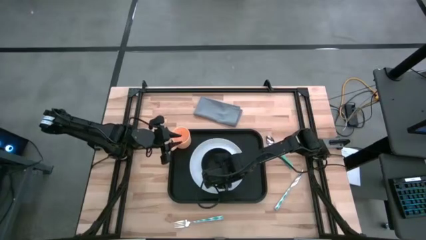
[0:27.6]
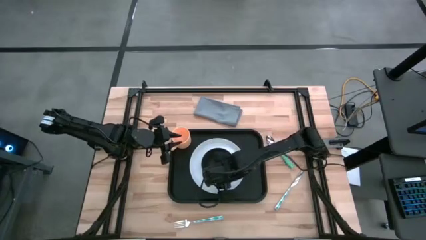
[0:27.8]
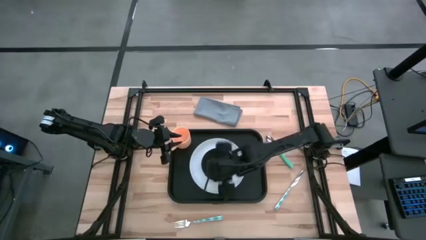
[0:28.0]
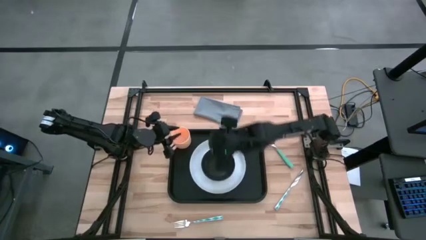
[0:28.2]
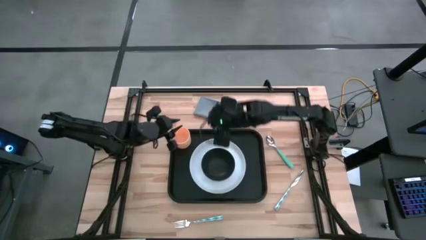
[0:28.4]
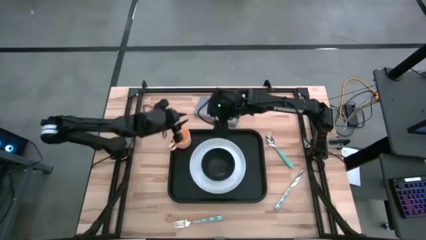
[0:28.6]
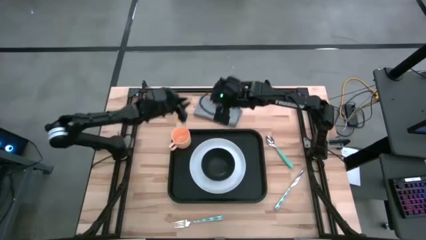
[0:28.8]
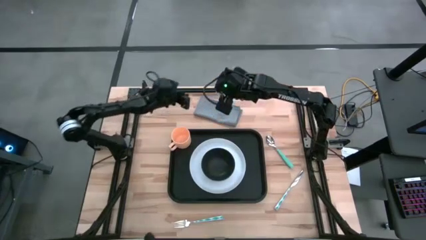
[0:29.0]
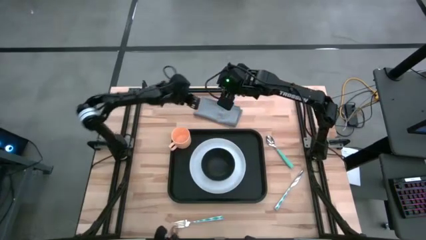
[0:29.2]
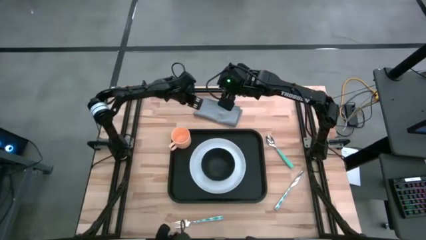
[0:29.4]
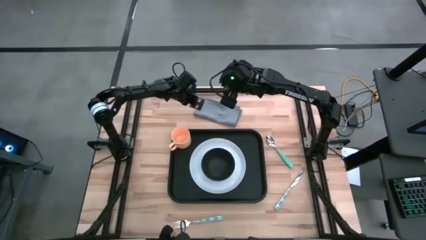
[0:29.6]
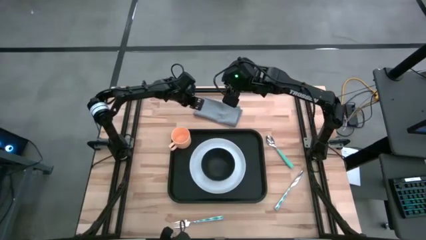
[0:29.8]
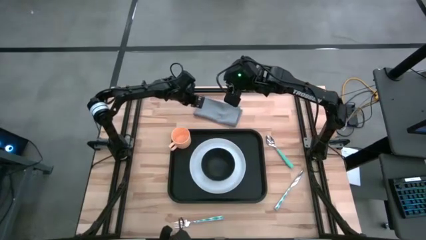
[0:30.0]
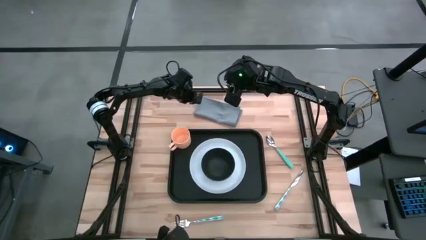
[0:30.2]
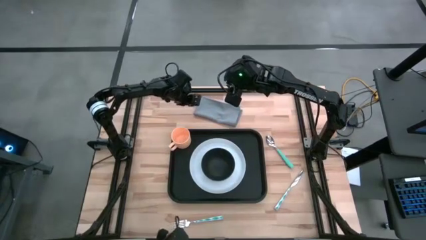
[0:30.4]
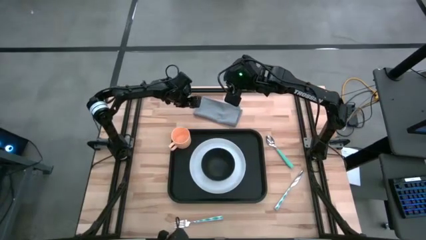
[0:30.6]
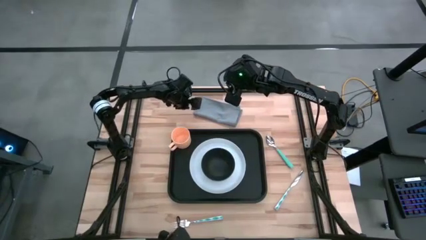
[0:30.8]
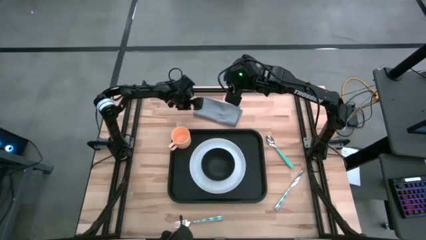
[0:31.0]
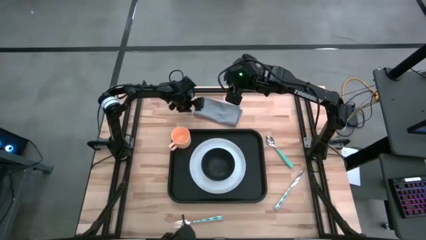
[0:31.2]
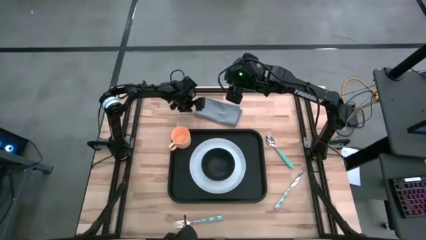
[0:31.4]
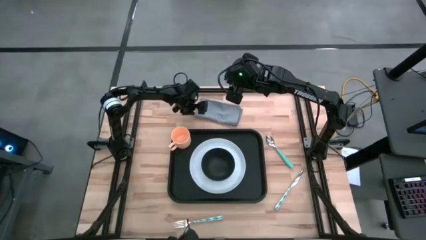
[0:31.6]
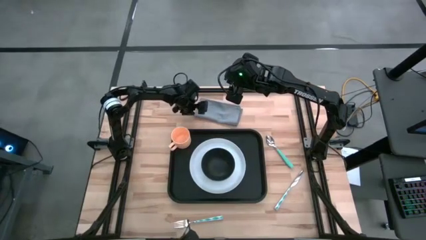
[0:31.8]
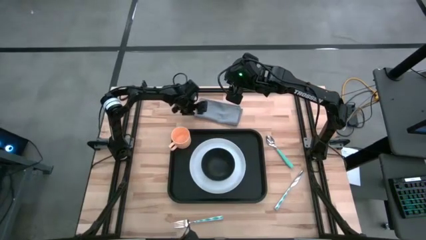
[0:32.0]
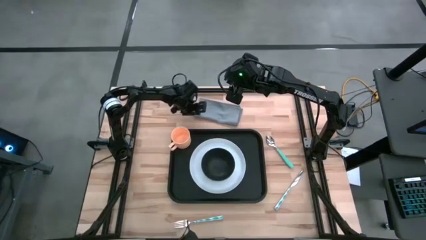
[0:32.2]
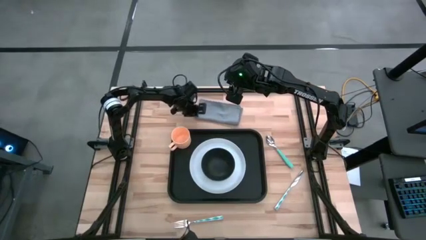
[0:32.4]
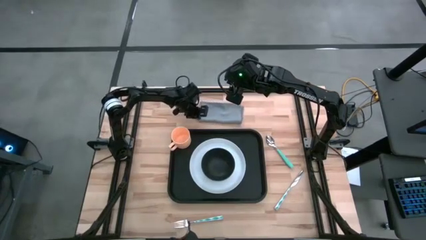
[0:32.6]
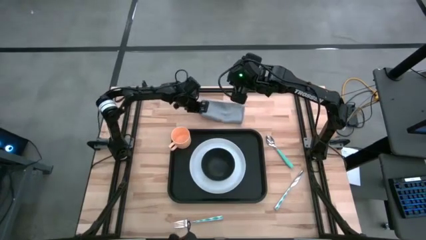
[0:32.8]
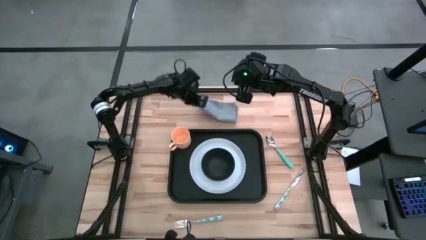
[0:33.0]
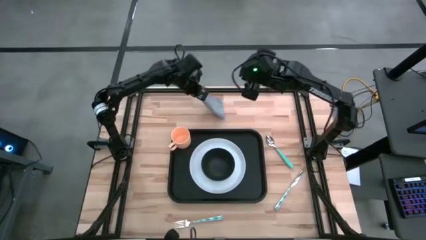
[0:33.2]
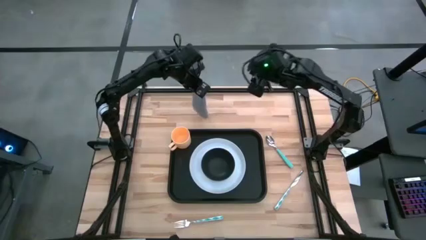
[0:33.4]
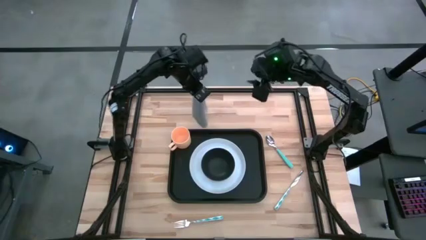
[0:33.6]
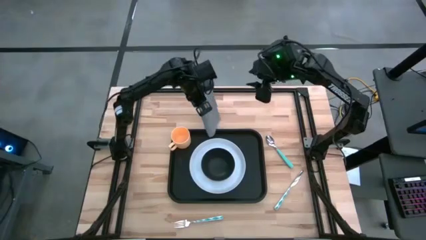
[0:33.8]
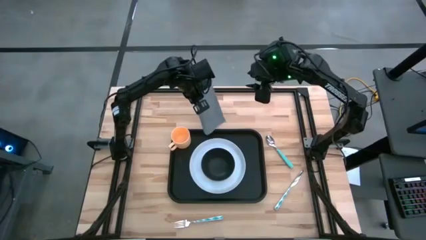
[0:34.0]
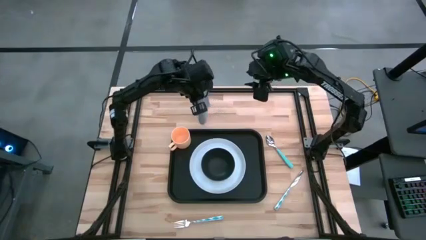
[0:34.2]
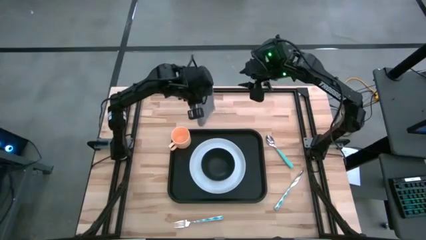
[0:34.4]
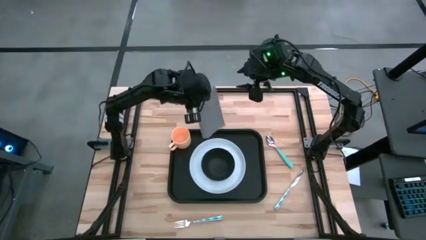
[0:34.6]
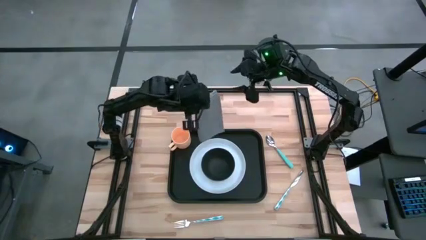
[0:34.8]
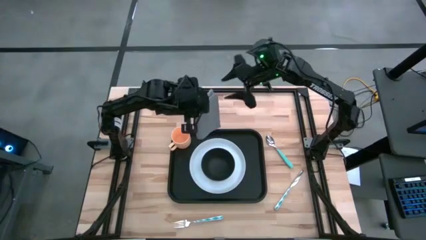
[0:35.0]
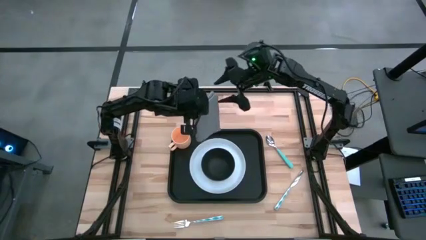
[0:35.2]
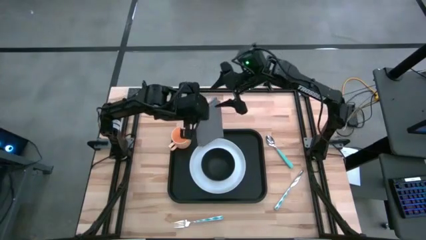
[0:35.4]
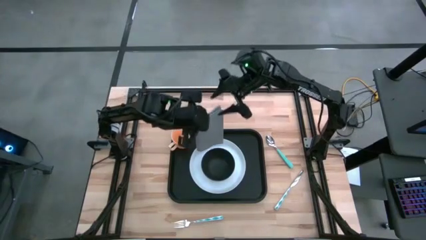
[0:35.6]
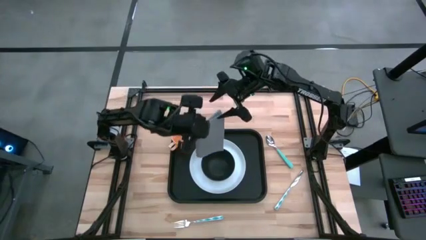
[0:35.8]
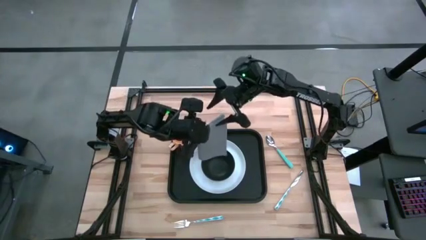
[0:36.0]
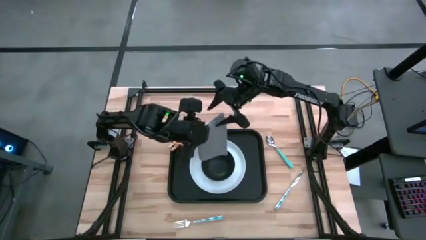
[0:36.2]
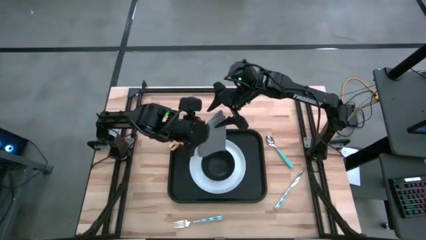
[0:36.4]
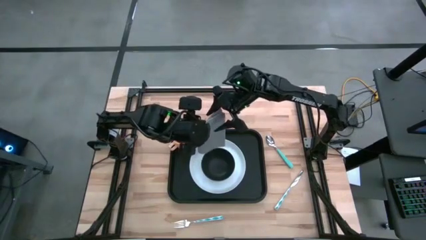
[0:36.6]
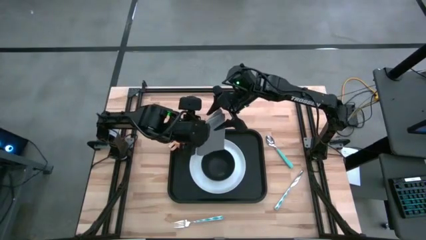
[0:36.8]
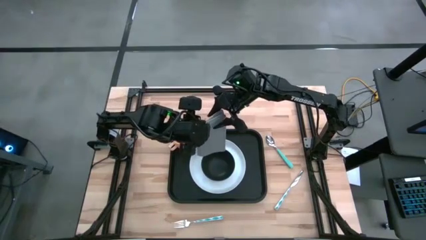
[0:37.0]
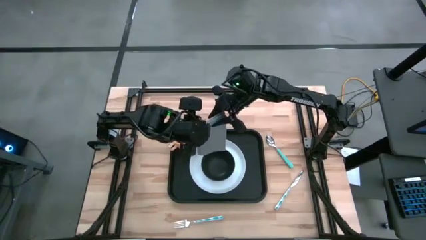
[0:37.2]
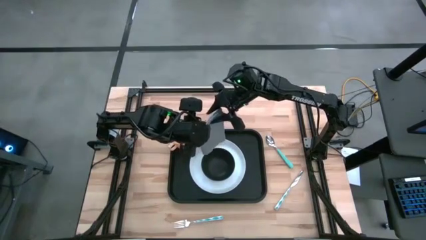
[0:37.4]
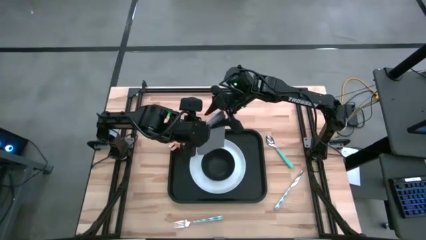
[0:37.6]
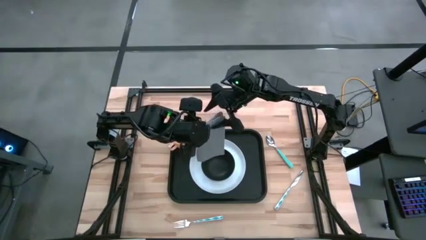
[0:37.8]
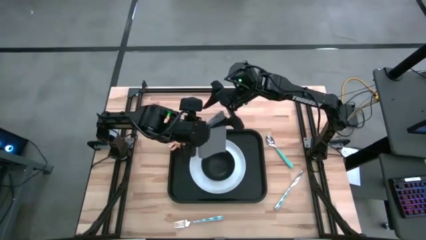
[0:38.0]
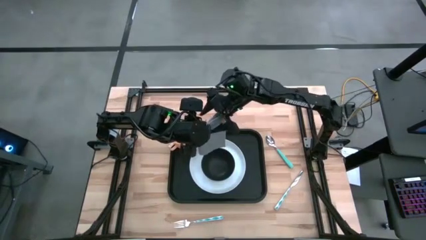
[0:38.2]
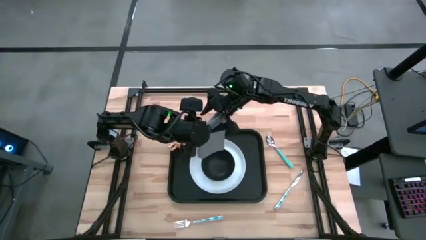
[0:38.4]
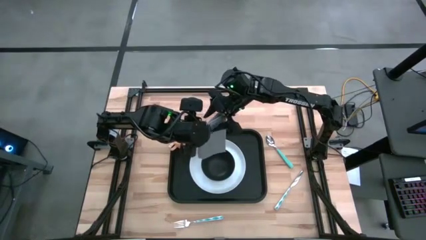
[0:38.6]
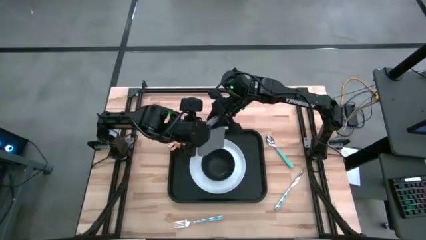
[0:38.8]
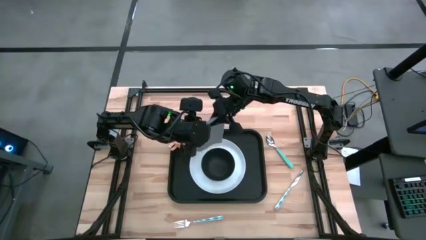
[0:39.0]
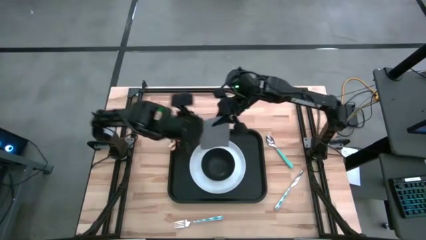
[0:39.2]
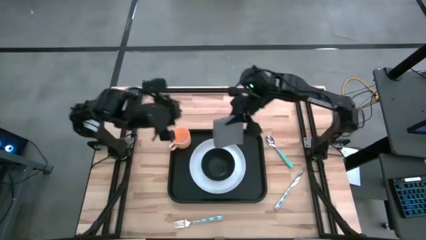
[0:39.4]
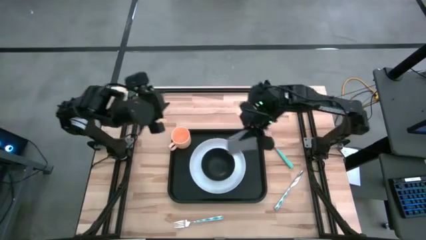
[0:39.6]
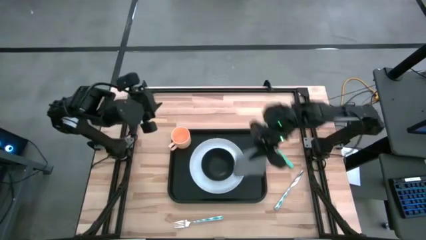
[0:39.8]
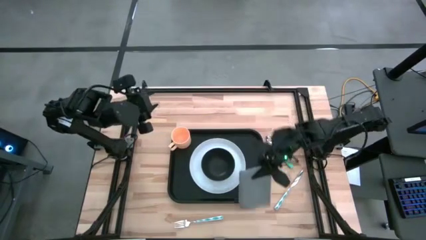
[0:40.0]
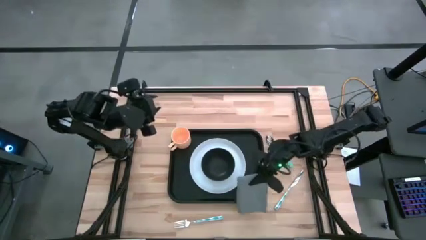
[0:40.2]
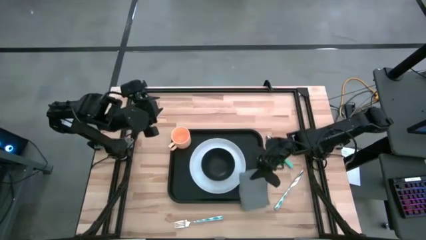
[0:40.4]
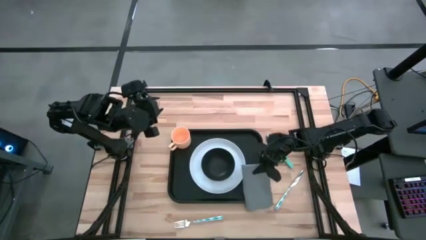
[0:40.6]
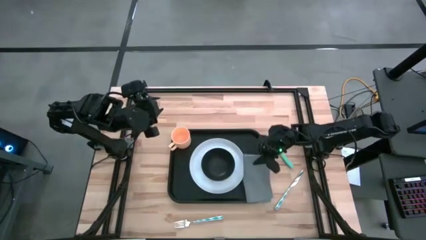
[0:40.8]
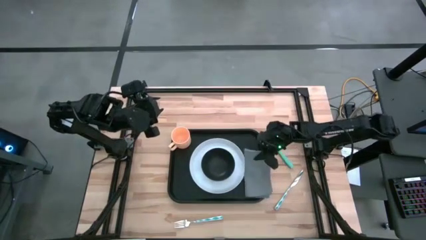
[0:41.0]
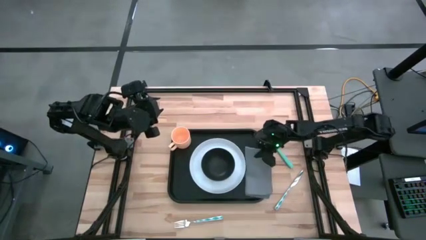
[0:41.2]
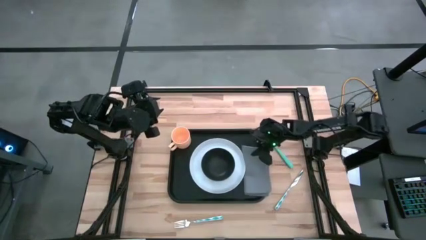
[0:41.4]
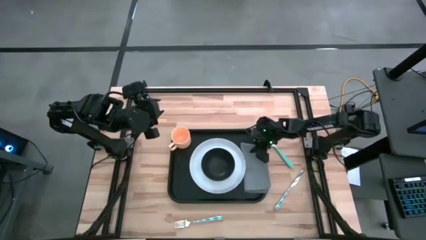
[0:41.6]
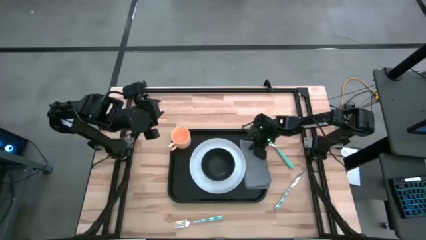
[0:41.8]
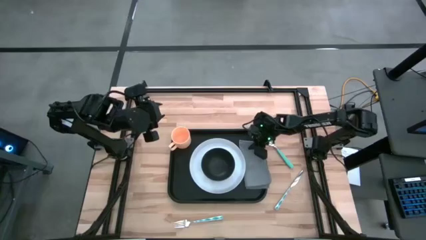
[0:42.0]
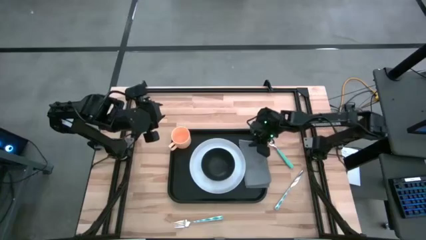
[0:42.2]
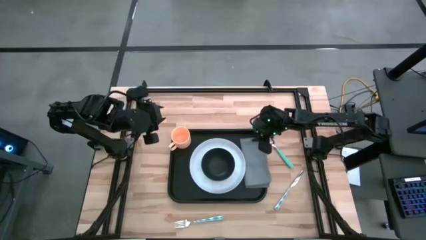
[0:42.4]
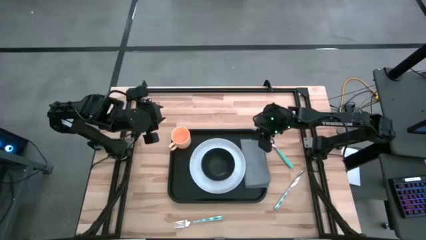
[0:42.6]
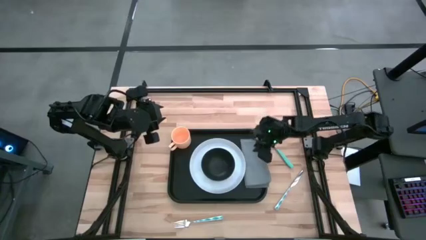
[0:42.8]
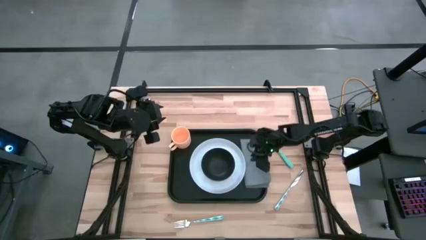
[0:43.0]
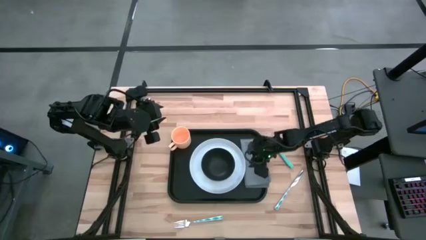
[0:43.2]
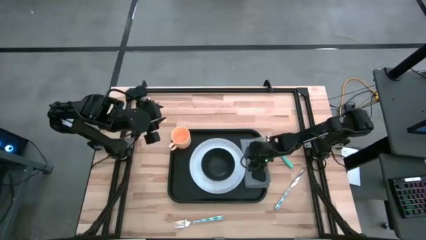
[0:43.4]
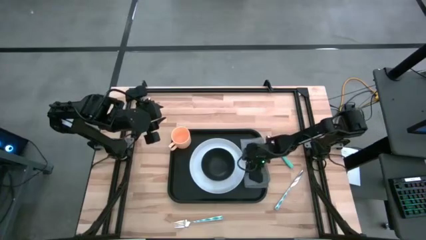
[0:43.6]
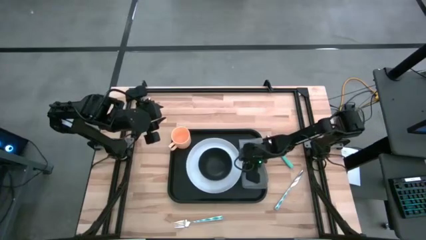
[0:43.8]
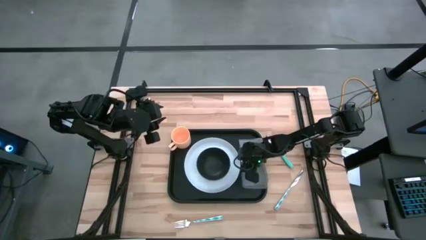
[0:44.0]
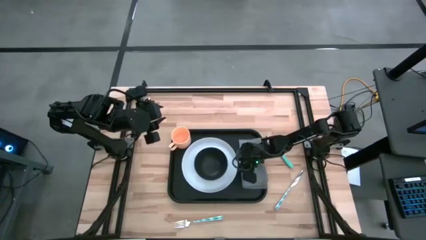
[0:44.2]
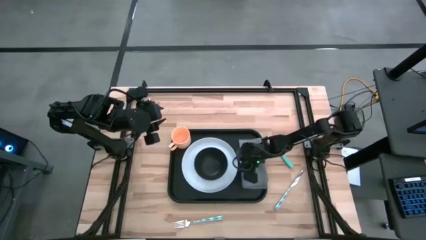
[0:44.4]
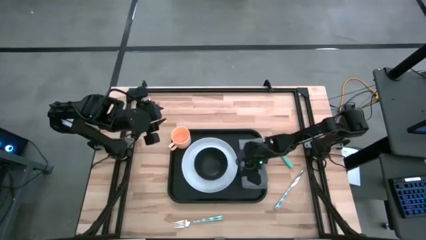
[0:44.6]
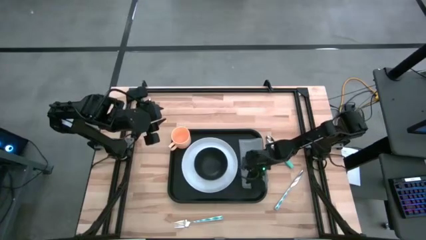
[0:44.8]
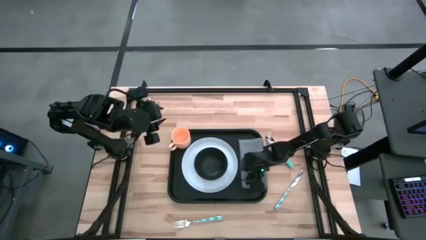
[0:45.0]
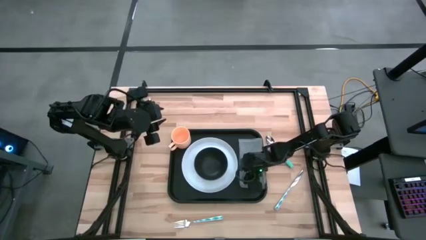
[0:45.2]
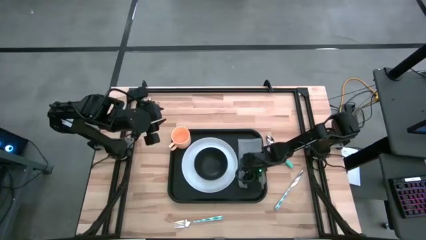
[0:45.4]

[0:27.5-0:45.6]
Task: Set up tray
Put the gray napkin on the black serving tray to the right of the white plate
